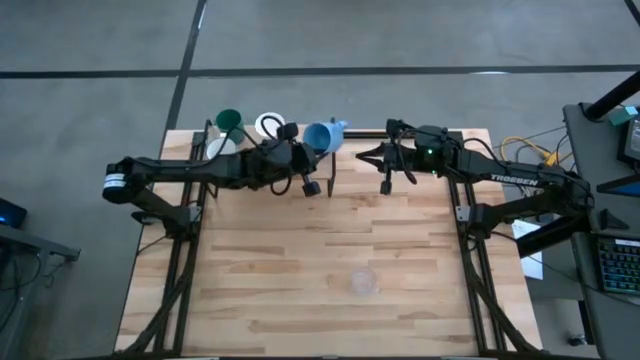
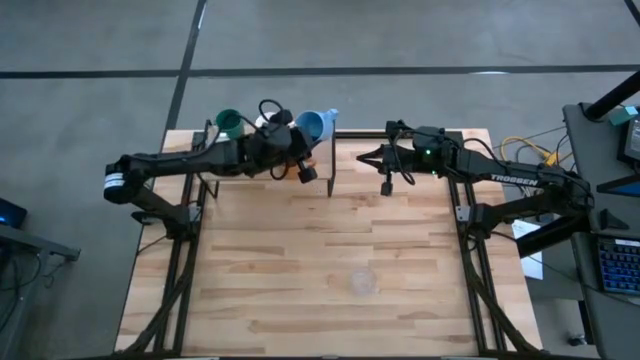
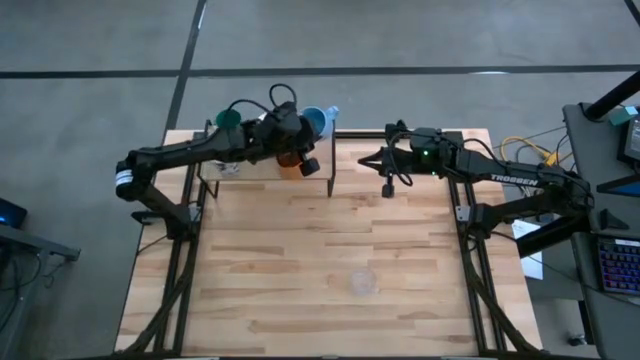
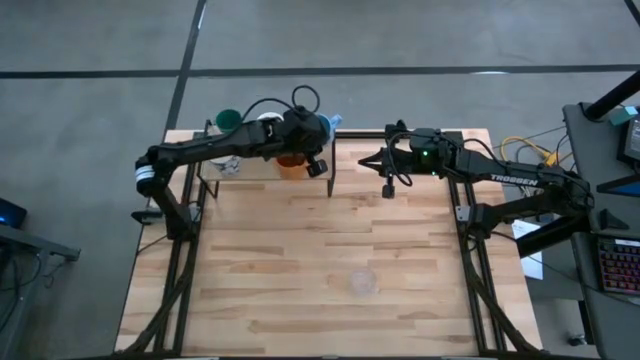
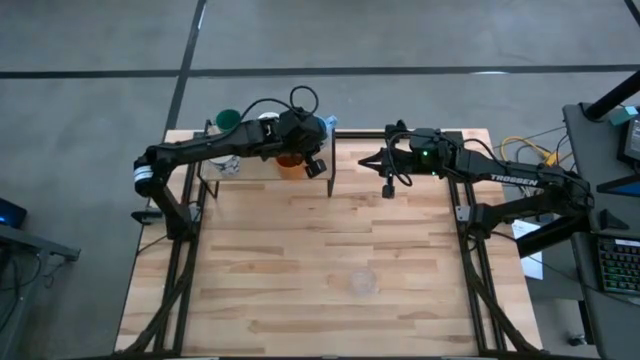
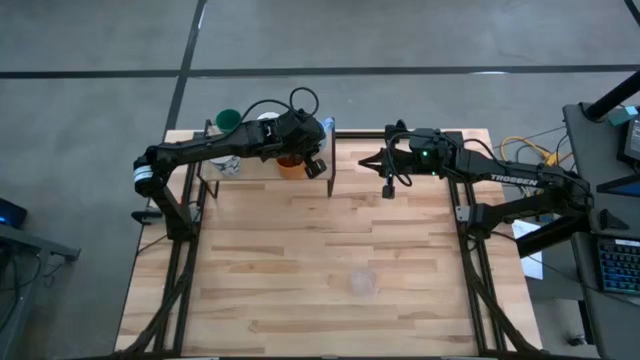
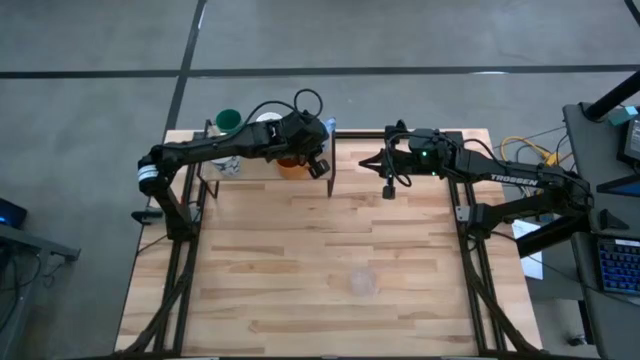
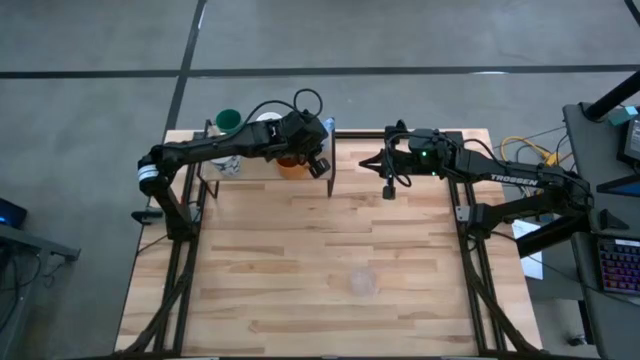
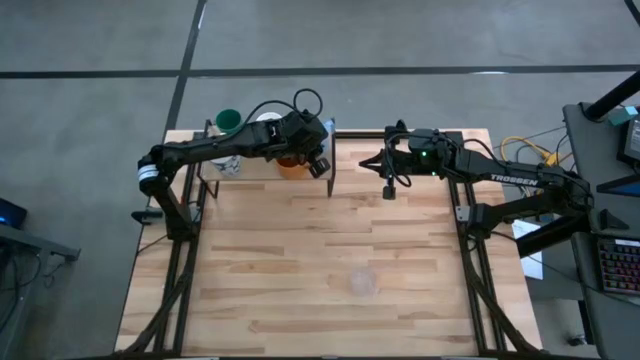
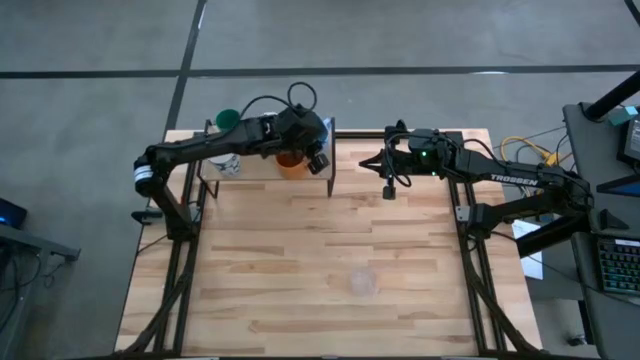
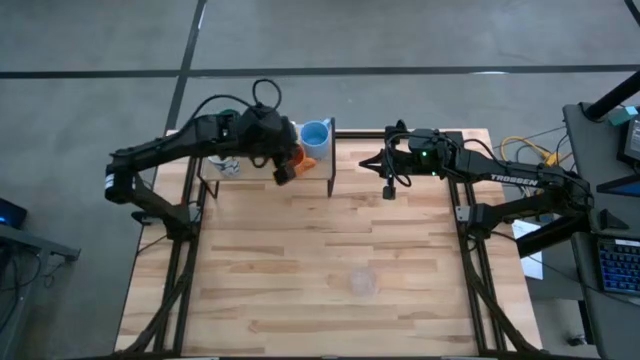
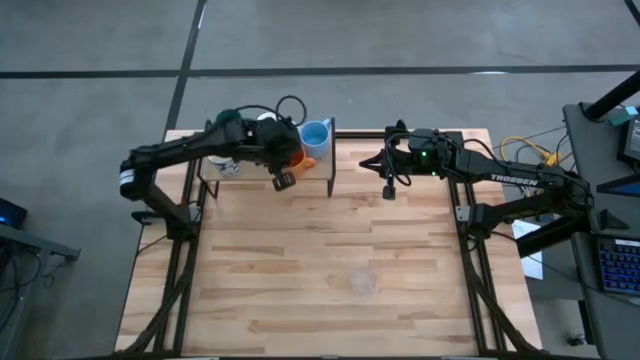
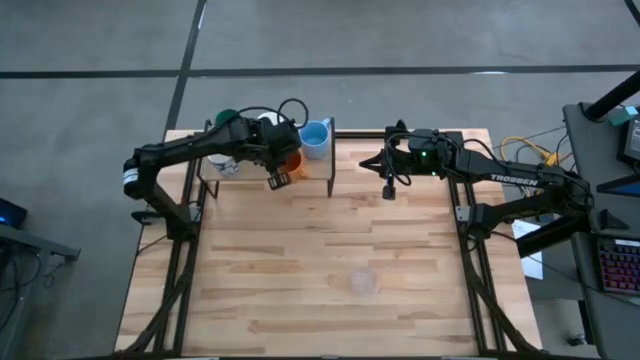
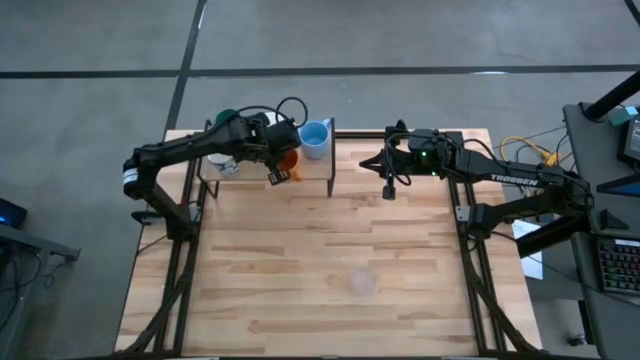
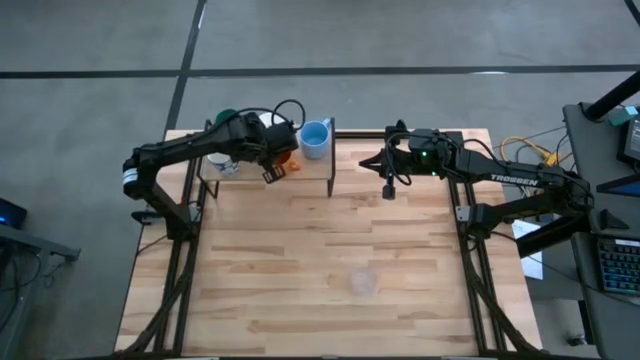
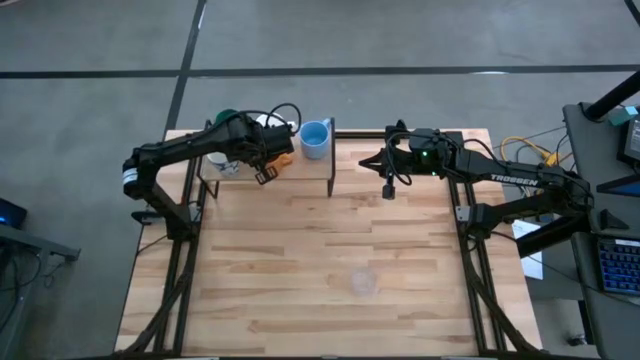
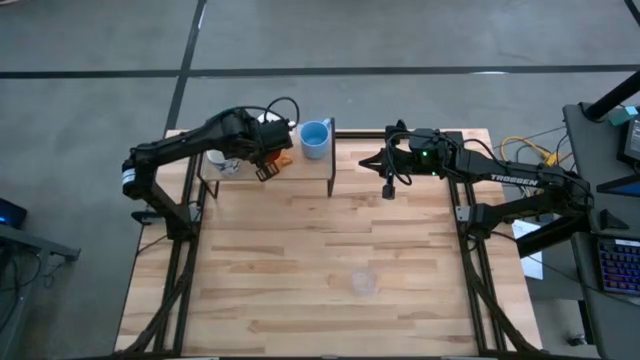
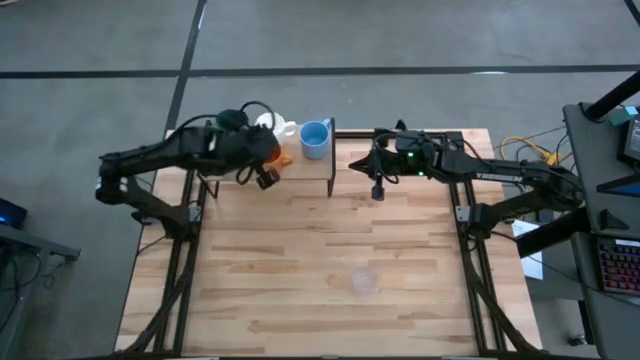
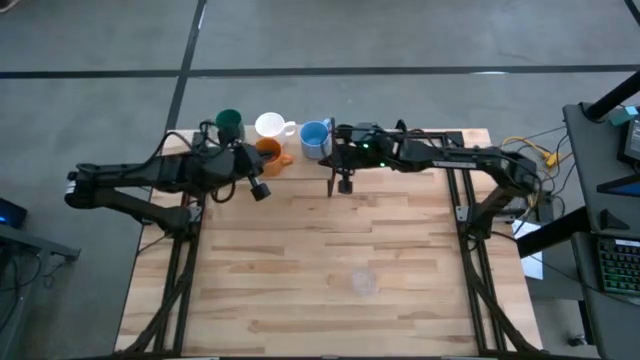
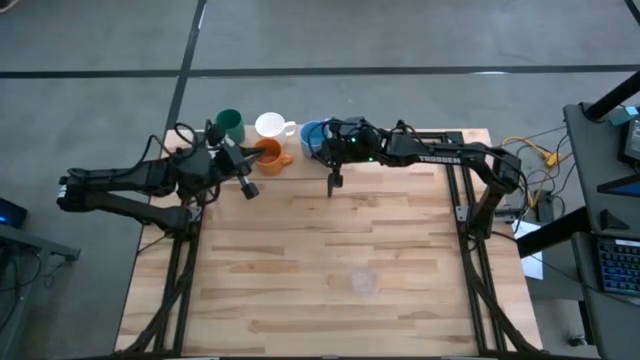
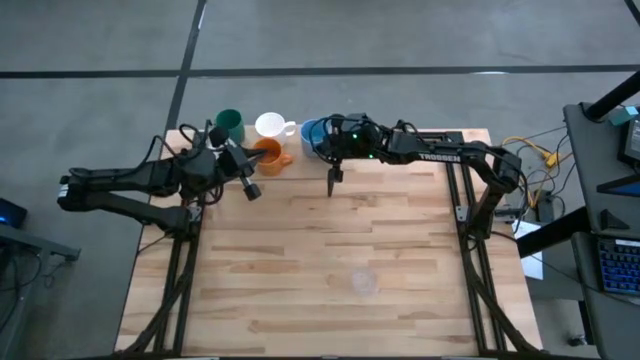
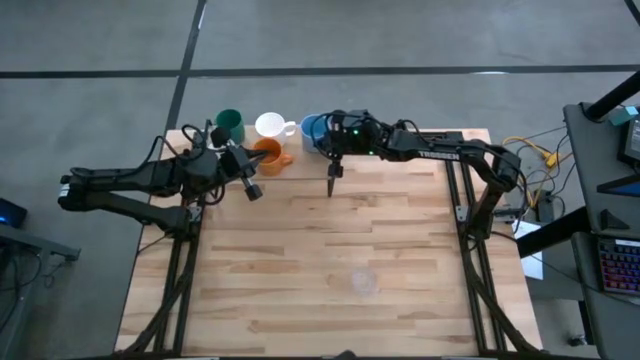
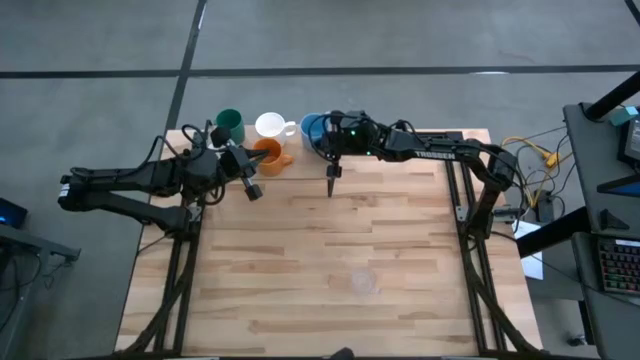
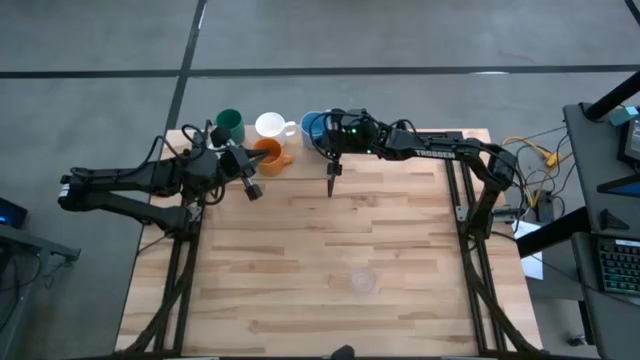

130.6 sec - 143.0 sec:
Task: Stack small to large cups/mugs on shelf
Adjust the orange mug and the light blue mug

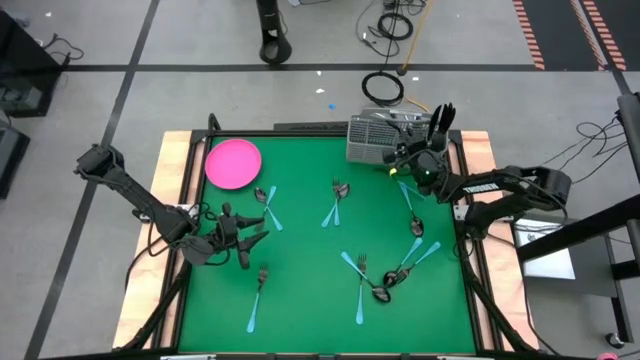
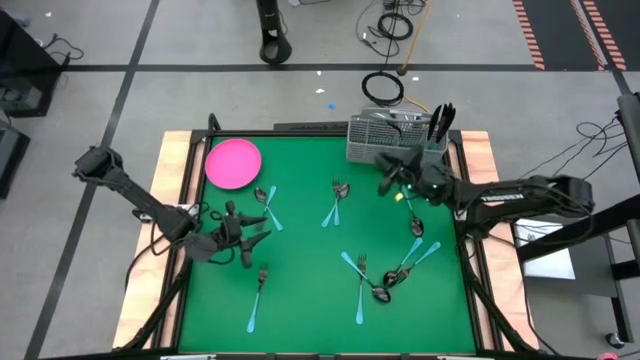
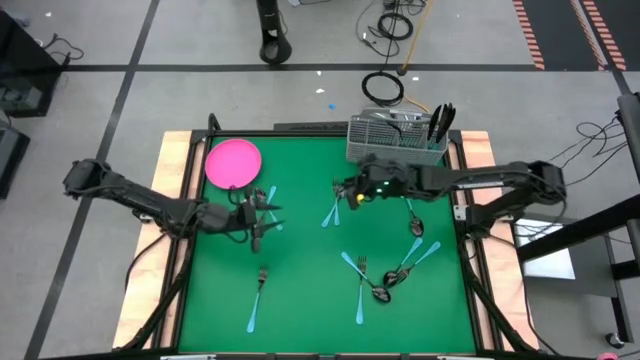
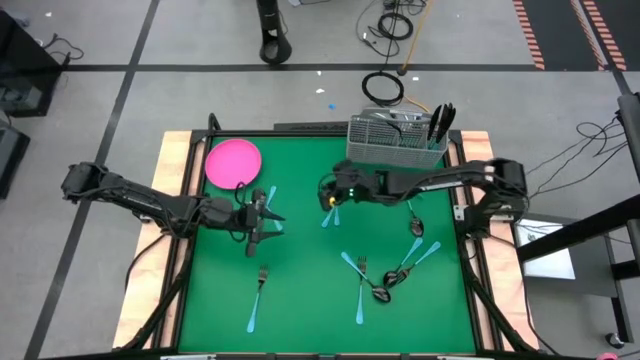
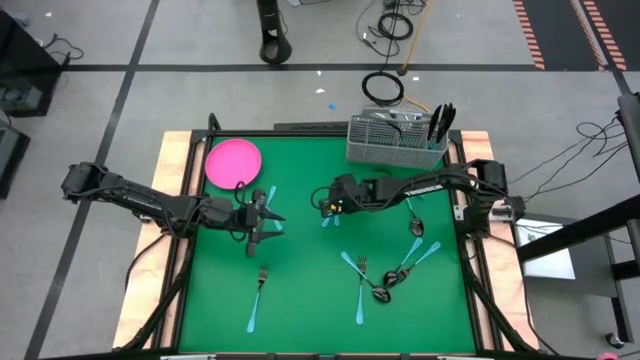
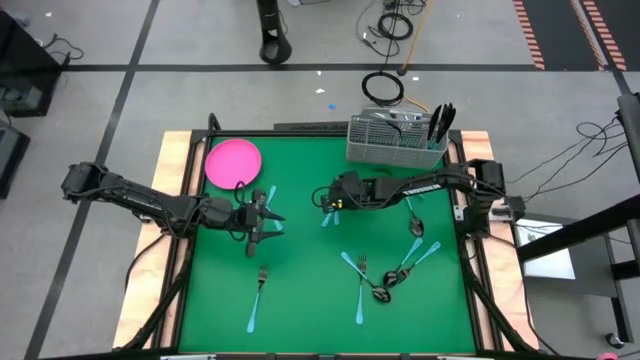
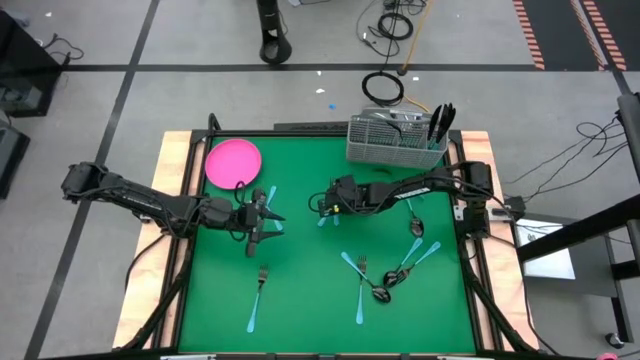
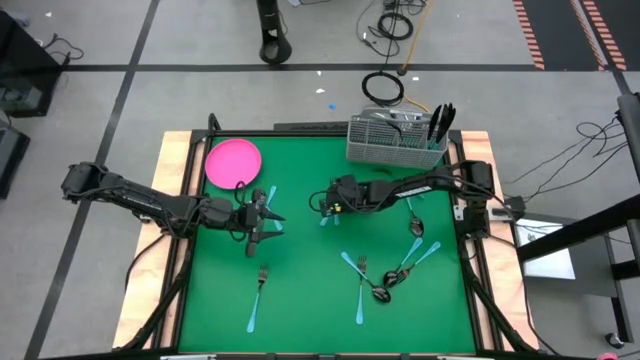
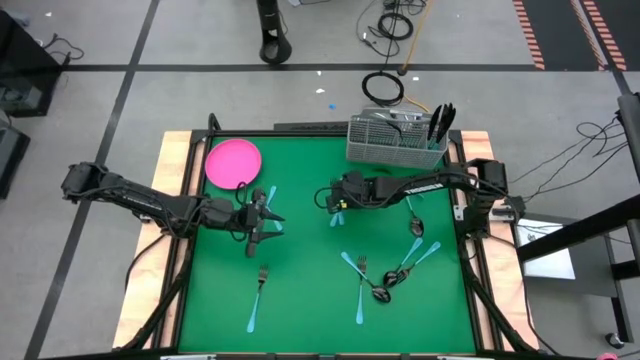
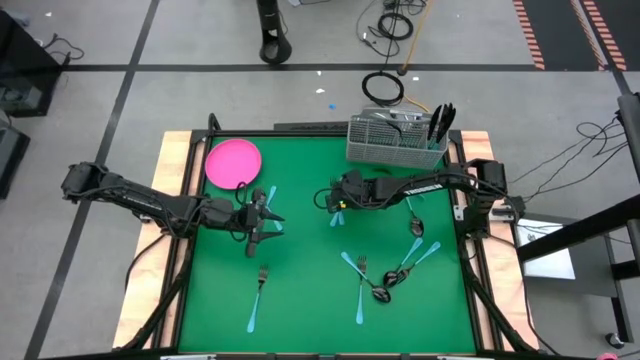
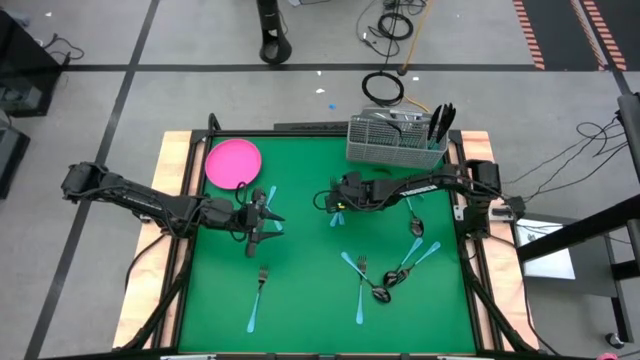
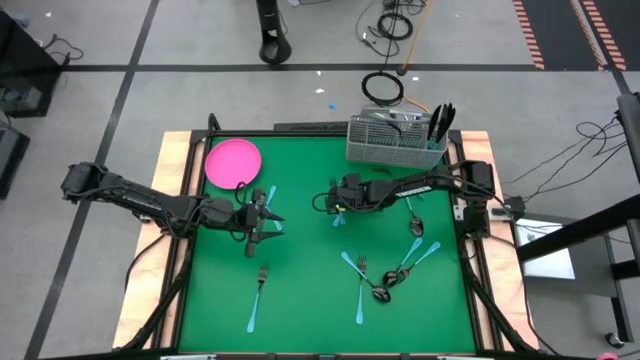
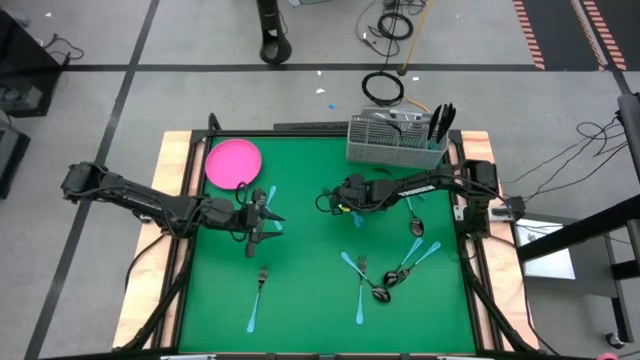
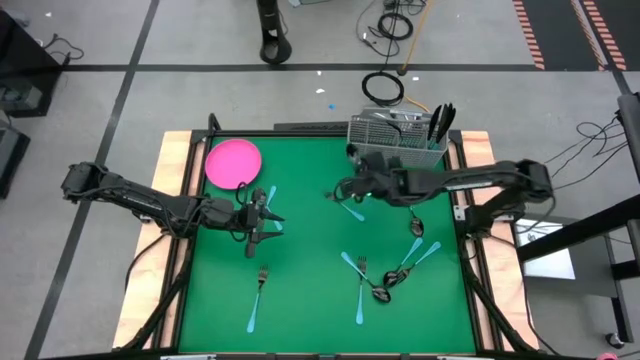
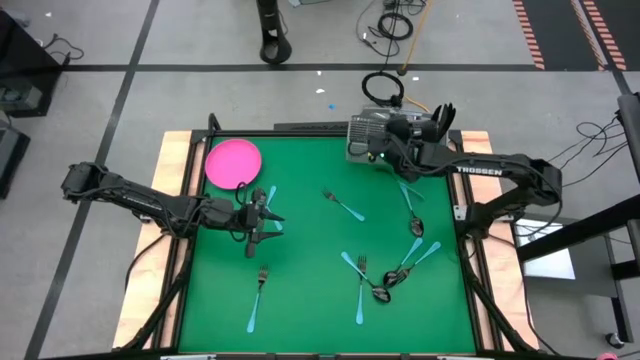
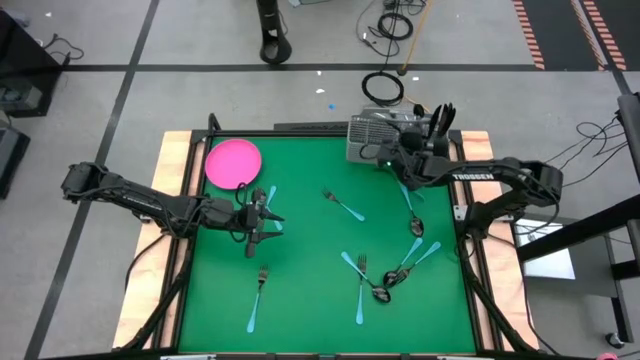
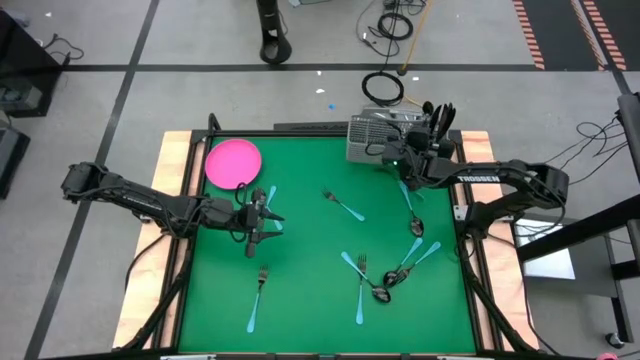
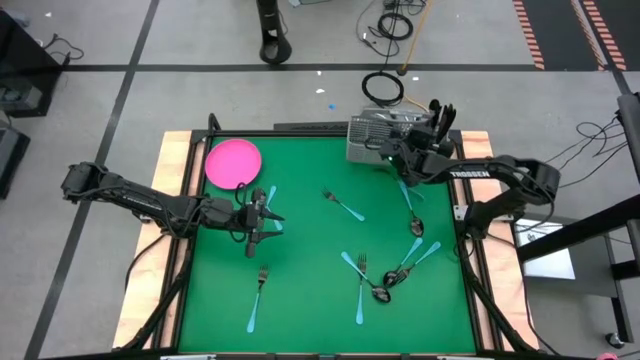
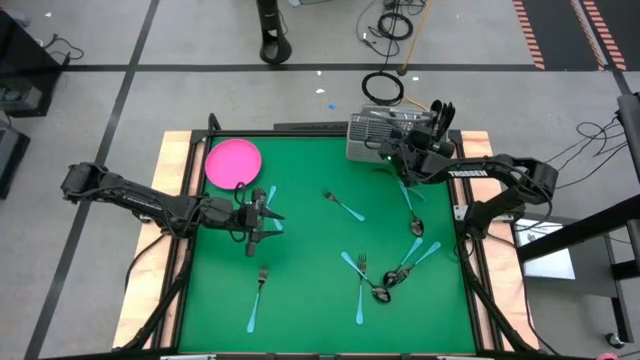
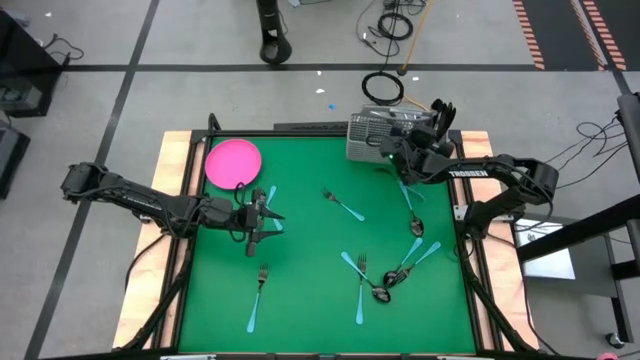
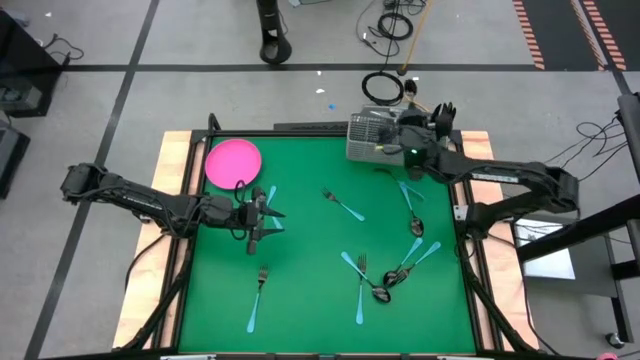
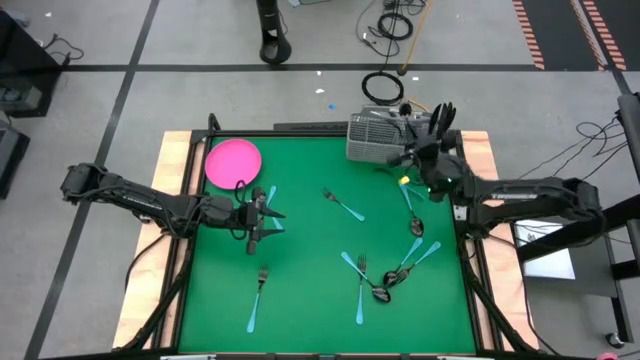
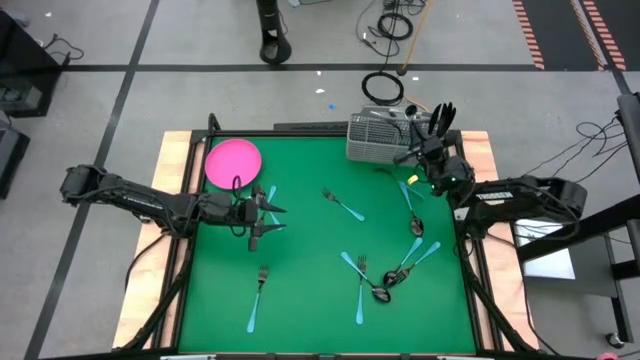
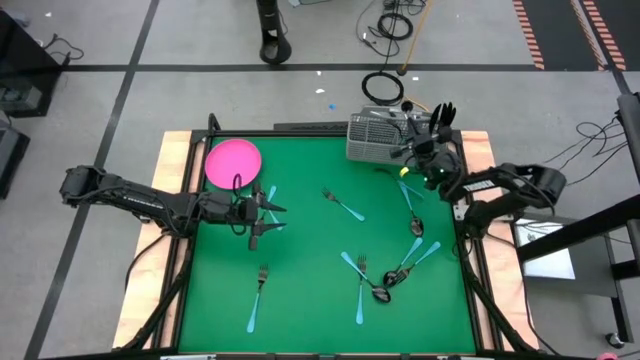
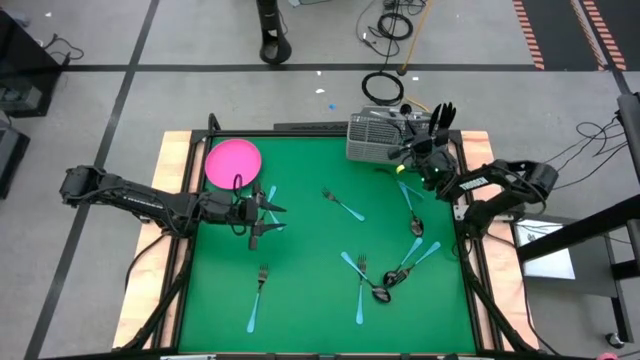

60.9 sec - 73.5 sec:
Task: Sort silverware
Put the blue spoon into the gray silverware basket
